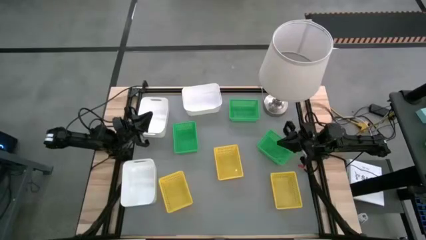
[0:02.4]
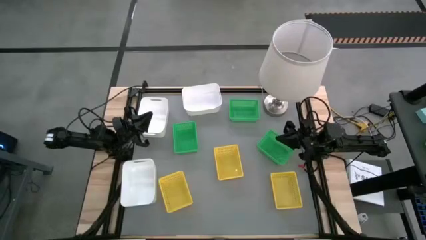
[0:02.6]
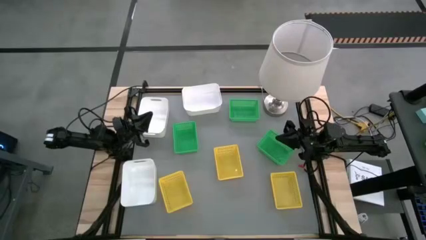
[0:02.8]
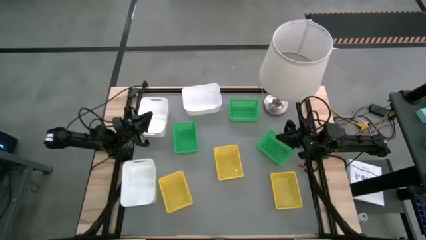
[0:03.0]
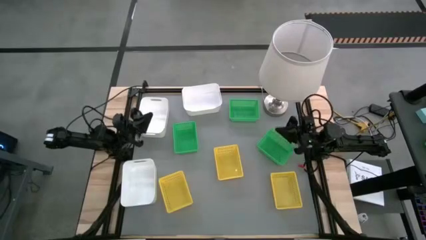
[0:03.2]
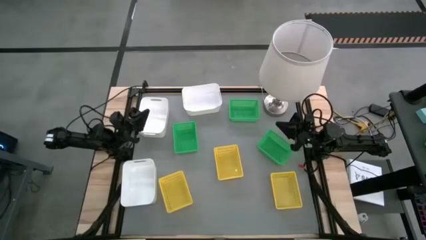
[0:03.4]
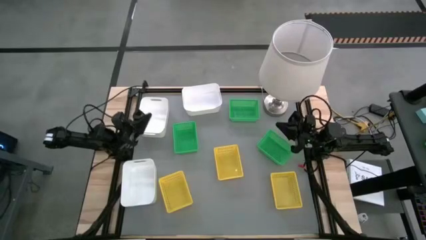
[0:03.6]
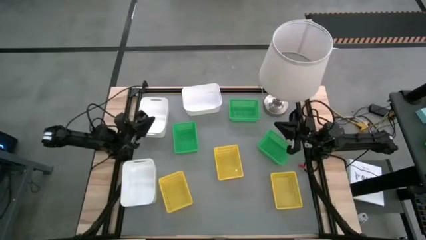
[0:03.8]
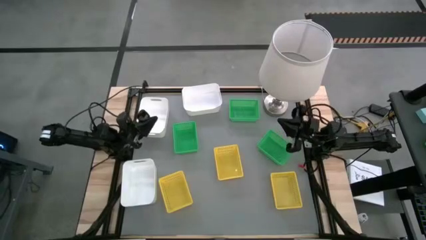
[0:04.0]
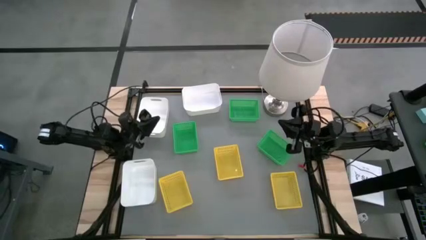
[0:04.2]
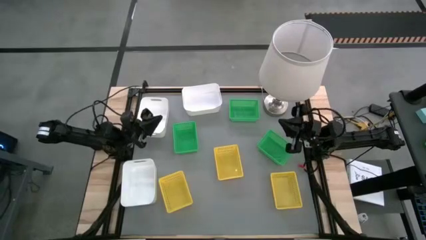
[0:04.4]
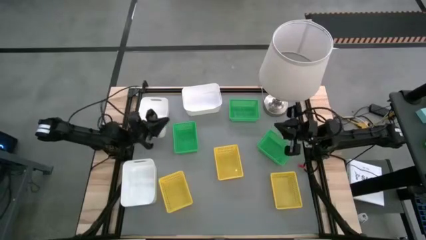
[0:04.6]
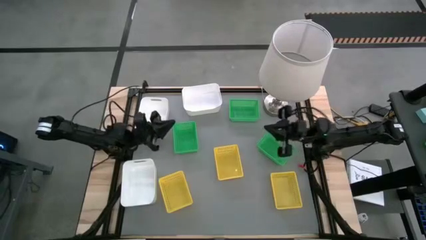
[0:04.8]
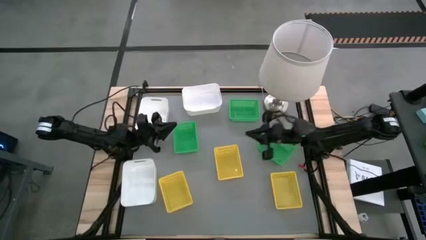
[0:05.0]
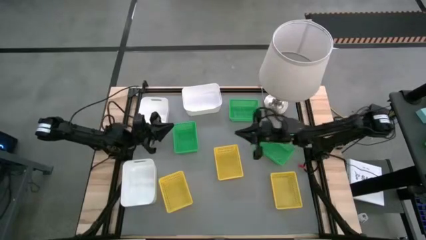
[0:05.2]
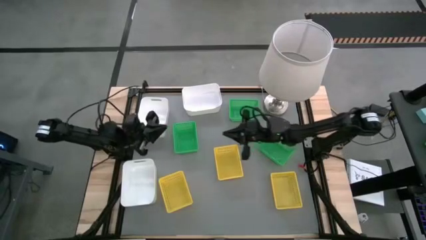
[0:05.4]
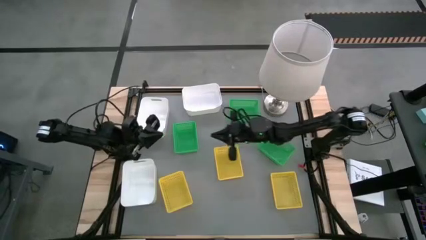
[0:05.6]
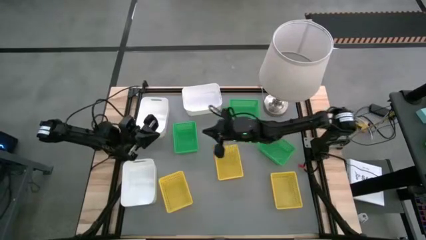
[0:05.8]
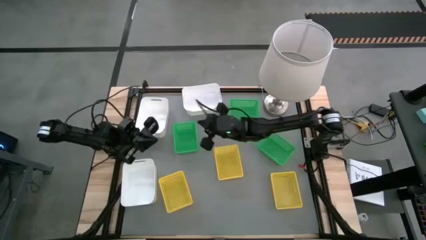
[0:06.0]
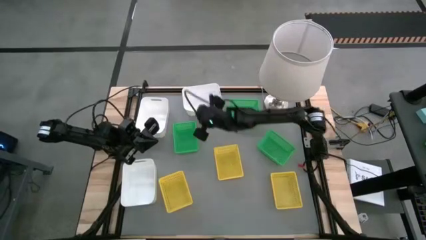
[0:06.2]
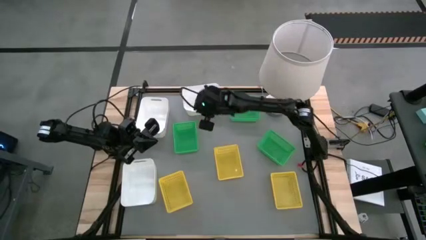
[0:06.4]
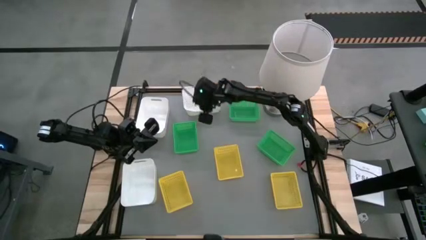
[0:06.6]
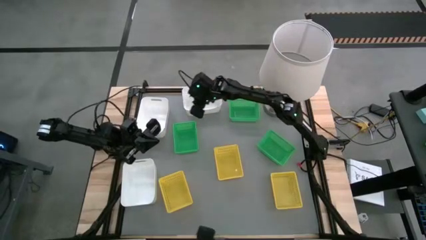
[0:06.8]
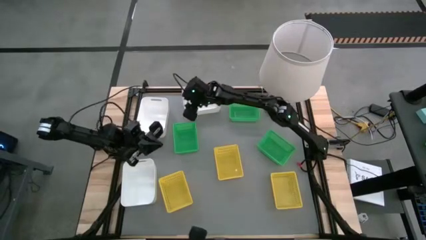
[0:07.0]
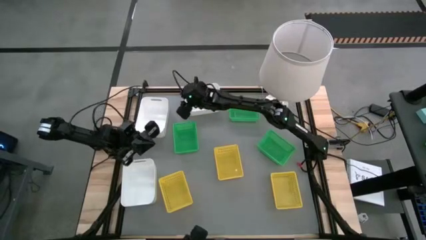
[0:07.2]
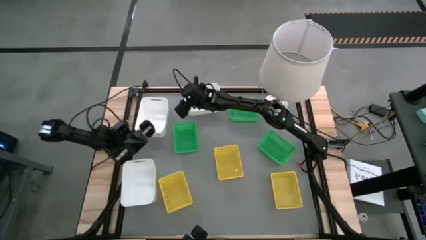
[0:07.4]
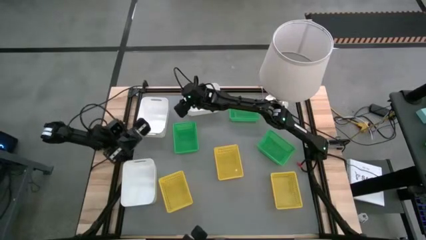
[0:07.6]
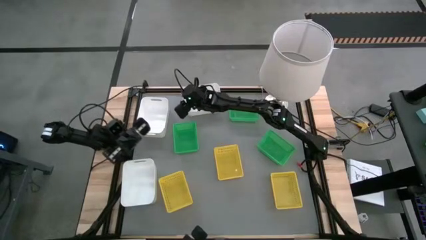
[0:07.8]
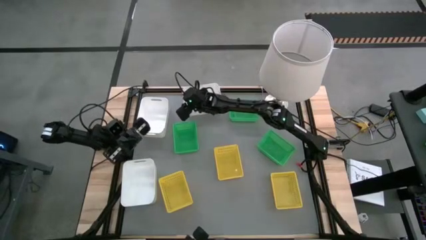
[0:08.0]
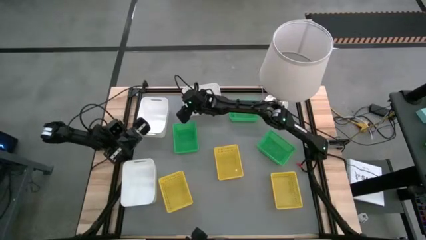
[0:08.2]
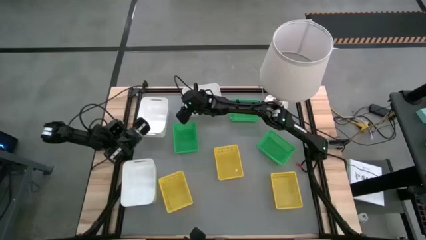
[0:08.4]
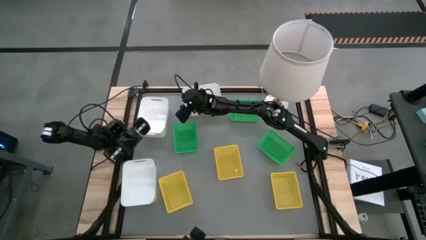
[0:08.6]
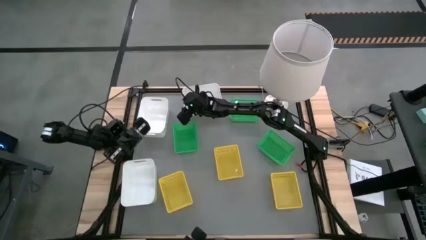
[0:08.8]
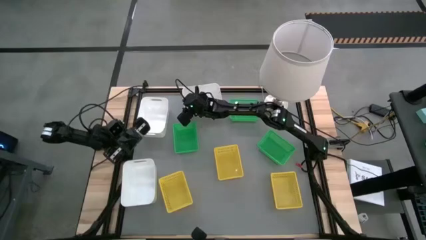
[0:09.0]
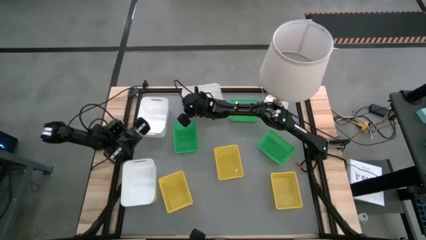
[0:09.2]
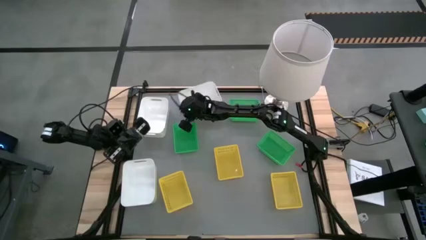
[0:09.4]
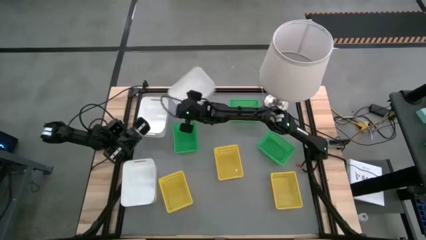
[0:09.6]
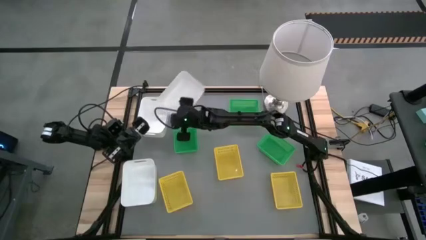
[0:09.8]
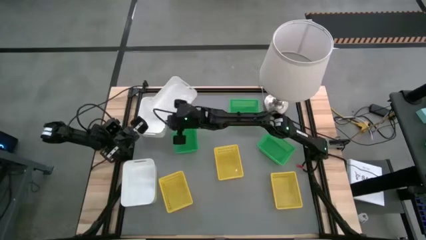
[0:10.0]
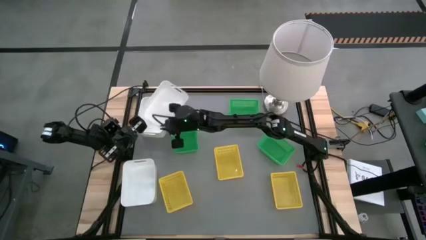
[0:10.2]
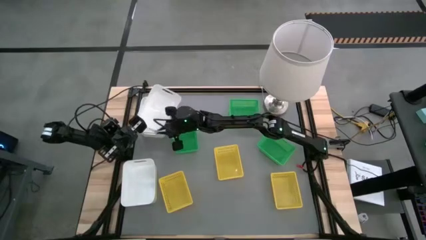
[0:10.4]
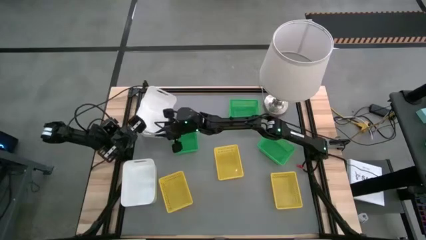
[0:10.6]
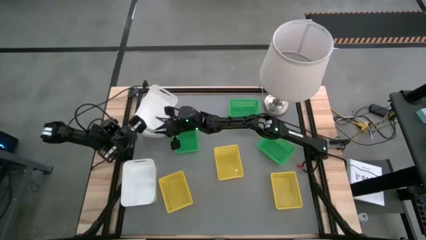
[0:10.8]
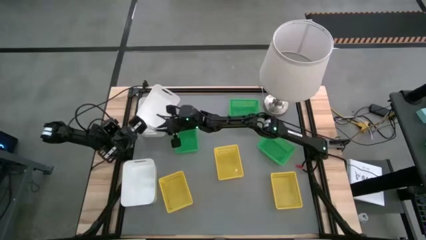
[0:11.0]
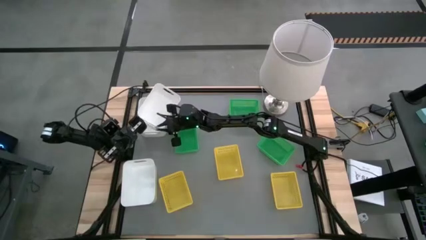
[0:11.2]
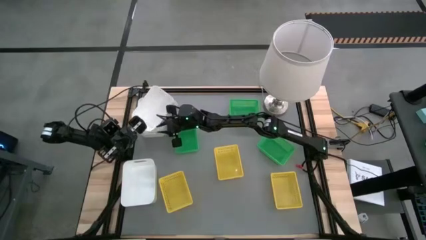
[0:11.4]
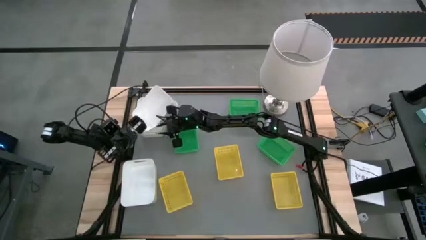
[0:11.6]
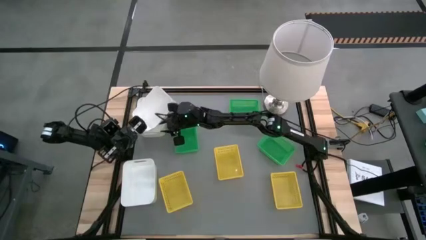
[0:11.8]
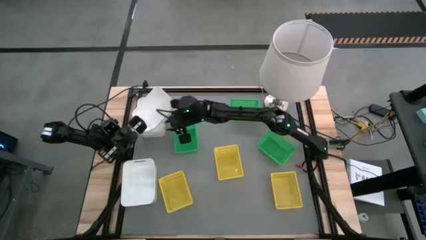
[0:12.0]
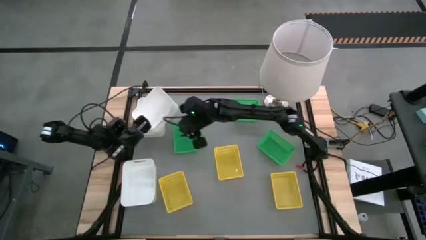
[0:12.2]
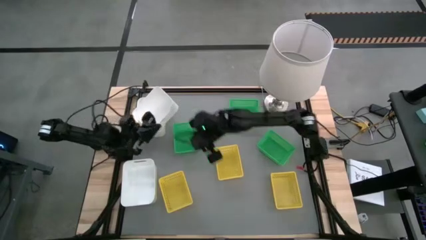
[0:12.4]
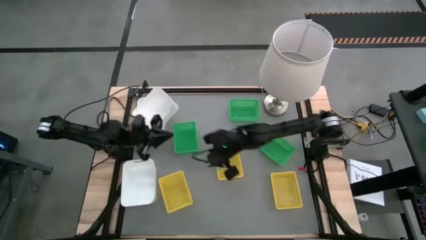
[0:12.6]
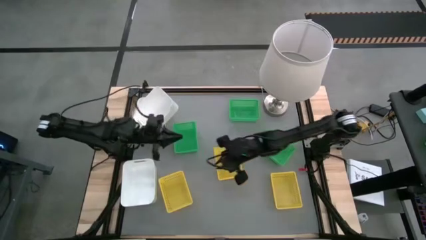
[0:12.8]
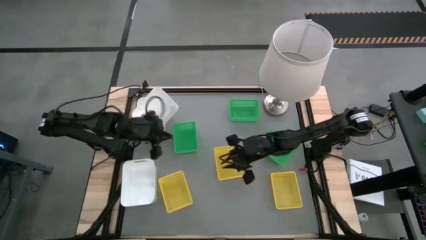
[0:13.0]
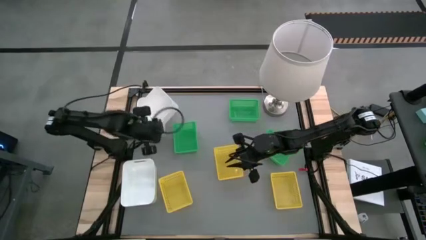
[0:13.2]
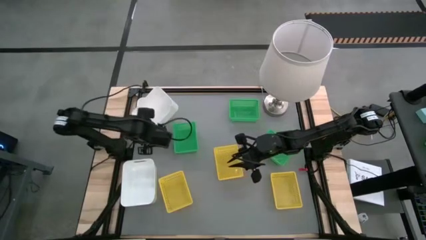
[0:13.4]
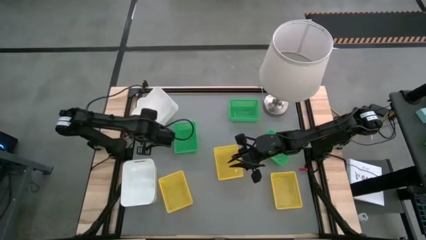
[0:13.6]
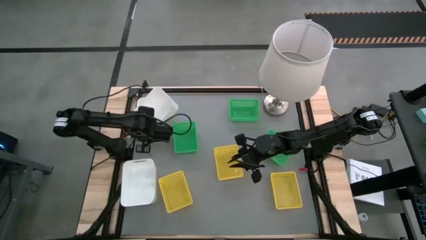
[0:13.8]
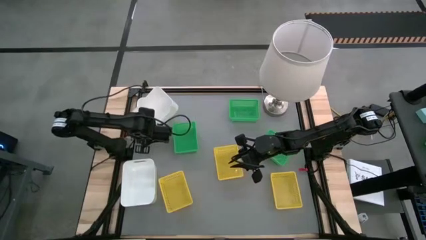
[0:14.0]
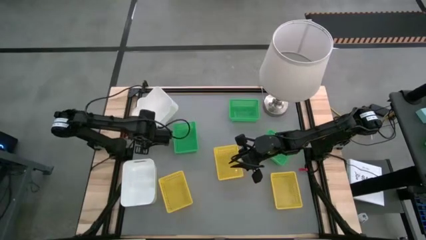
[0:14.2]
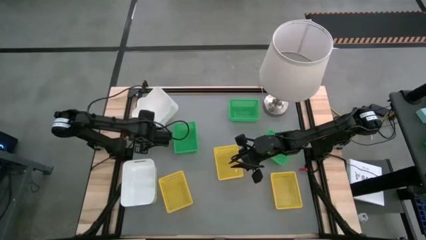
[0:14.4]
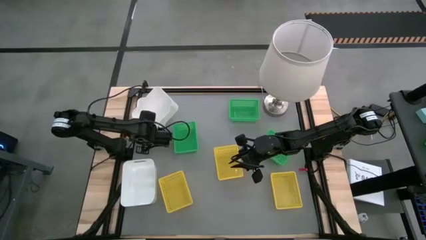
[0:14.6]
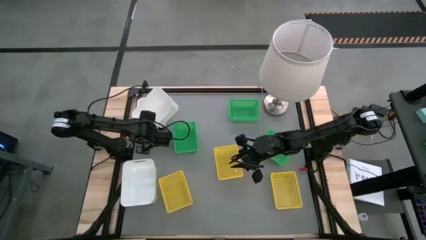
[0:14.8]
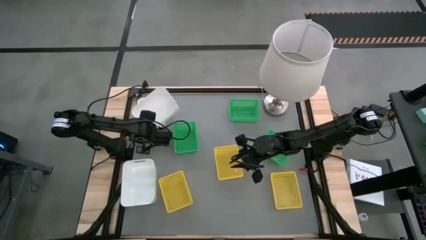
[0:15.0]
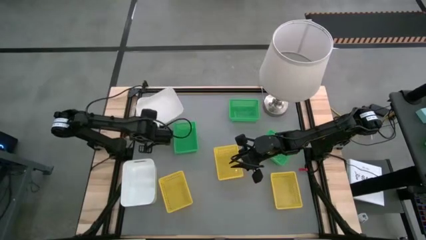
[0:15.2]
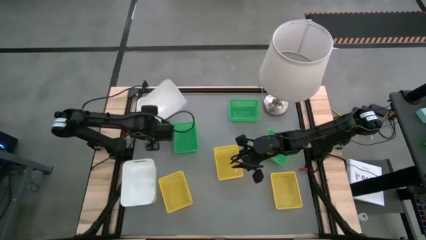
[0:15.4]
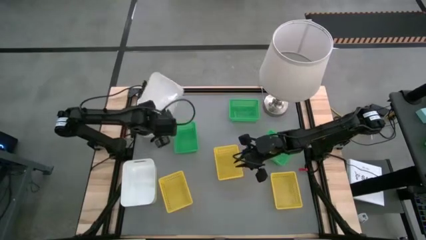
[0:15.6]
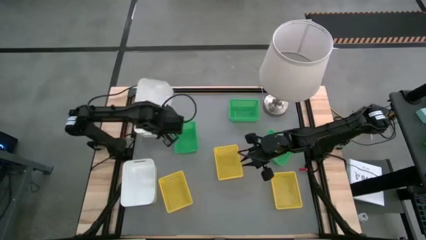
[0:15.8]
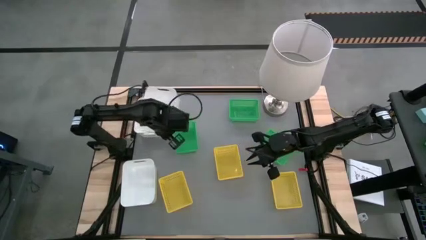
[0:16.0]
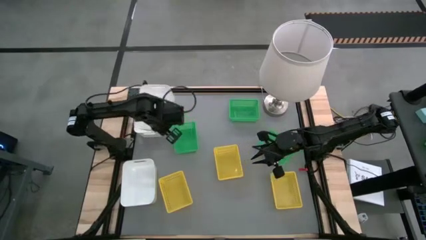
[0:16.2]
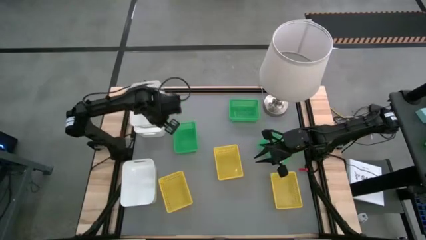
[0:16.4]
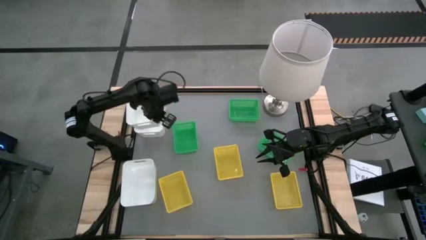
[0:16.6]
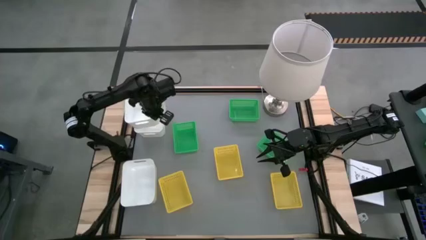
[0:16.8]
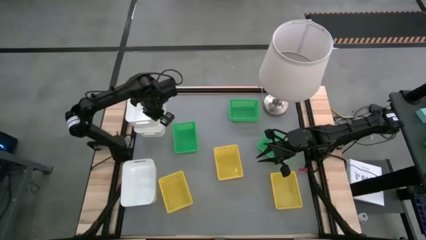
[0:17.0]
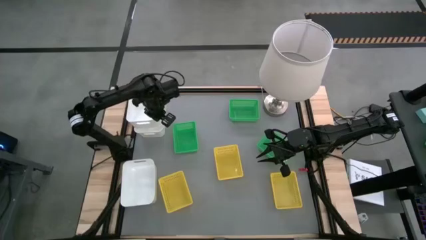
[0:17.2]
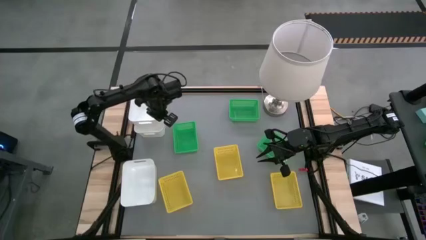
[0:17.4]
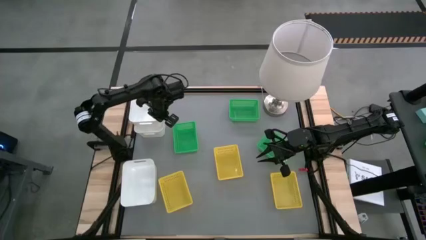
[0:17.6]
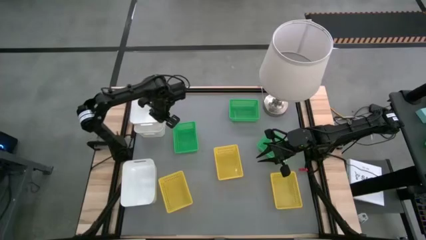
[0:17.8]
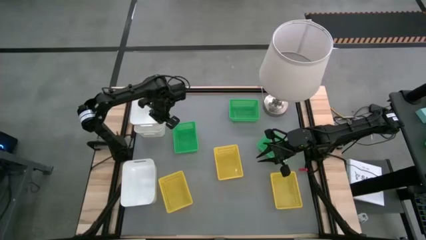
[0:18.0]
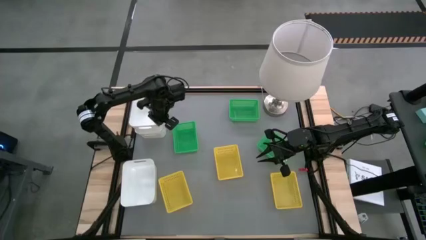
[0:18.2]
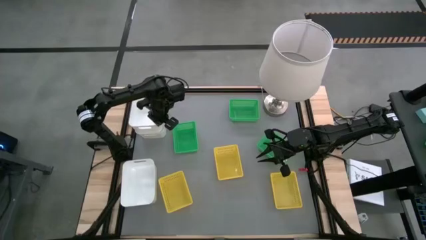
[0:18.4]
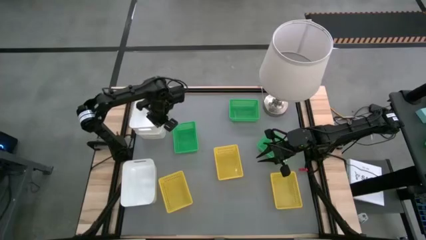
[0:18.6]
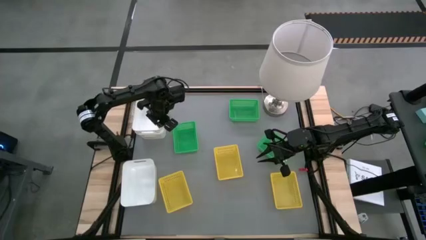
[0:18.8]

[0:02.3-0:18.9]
Stack the top right white bin on the top left white bin
